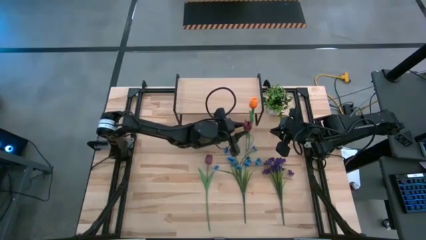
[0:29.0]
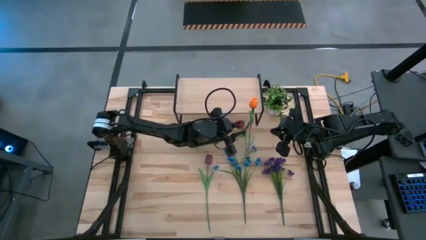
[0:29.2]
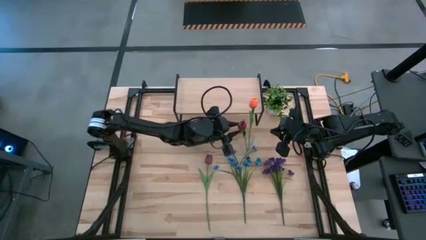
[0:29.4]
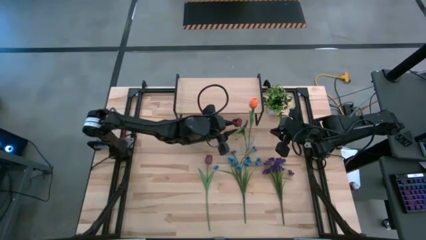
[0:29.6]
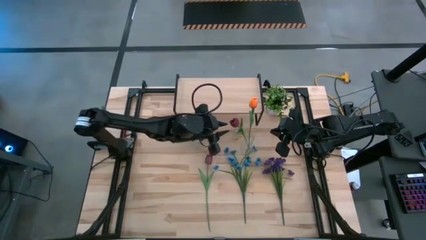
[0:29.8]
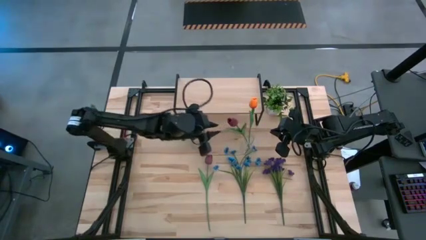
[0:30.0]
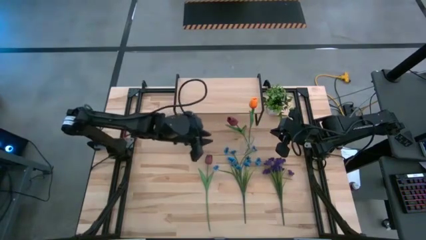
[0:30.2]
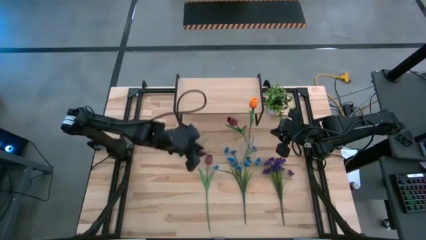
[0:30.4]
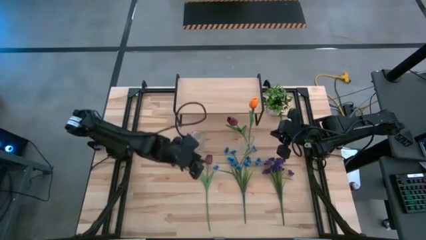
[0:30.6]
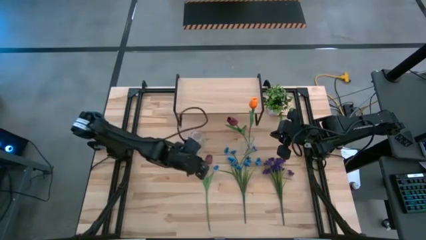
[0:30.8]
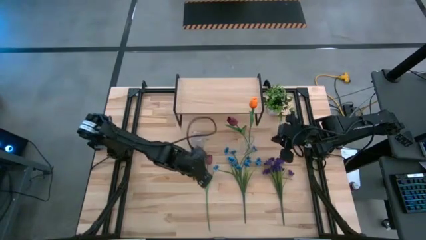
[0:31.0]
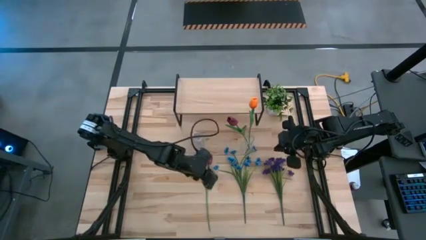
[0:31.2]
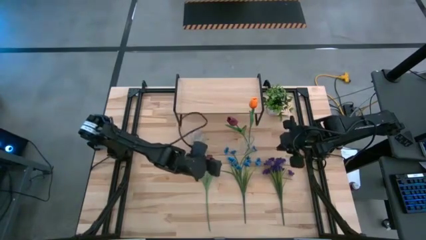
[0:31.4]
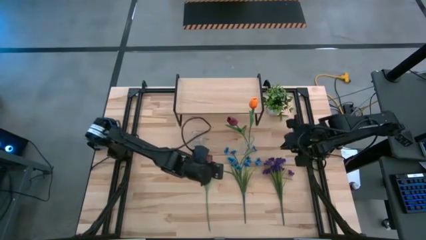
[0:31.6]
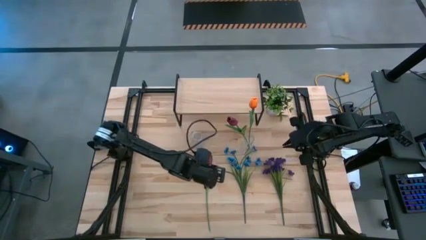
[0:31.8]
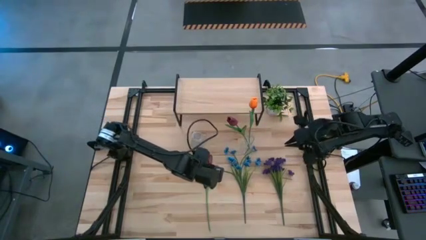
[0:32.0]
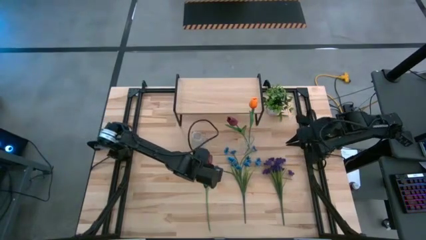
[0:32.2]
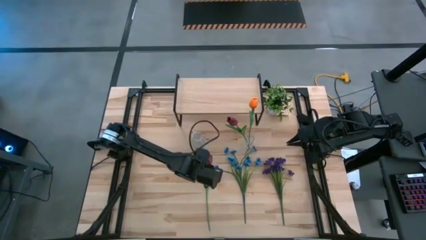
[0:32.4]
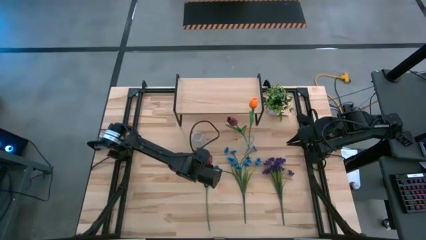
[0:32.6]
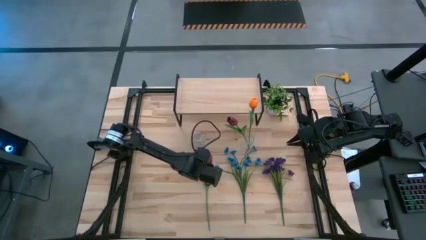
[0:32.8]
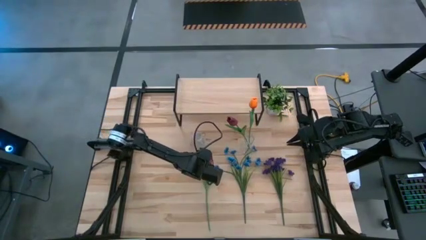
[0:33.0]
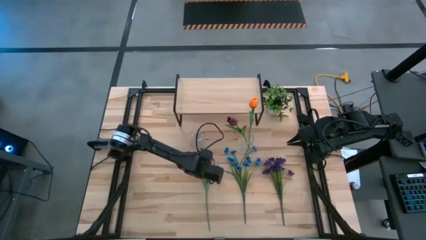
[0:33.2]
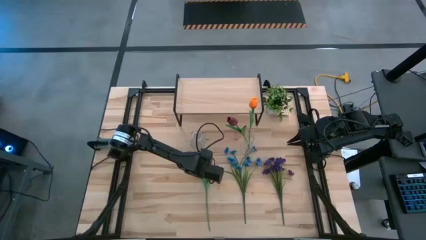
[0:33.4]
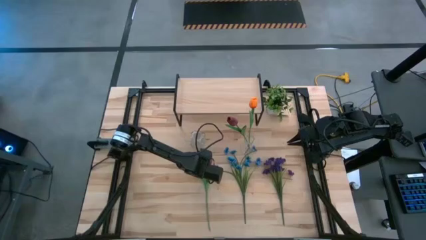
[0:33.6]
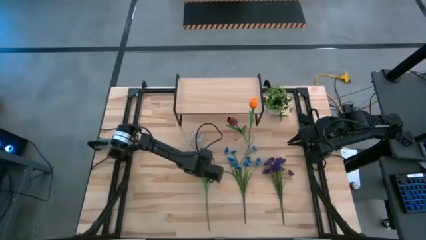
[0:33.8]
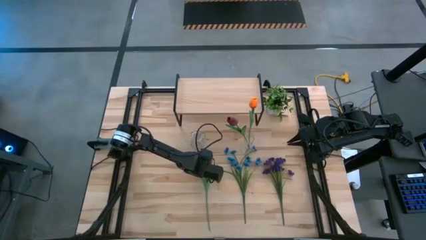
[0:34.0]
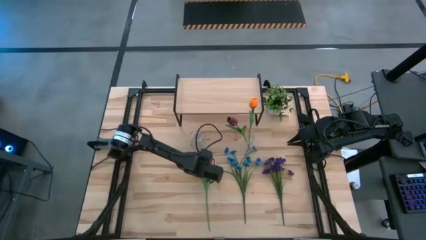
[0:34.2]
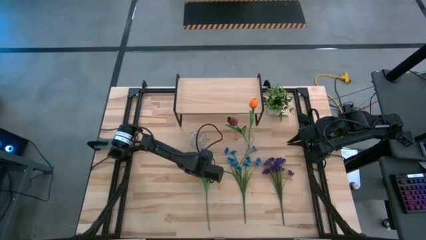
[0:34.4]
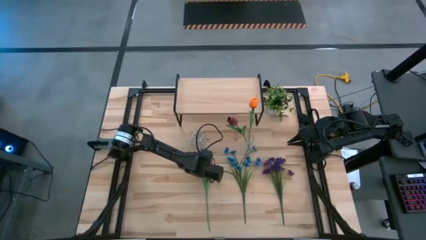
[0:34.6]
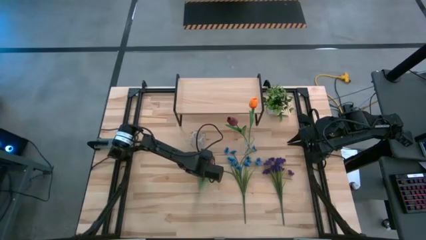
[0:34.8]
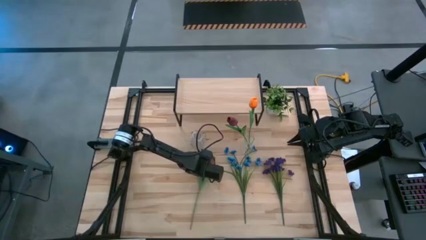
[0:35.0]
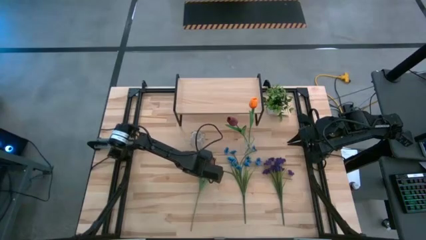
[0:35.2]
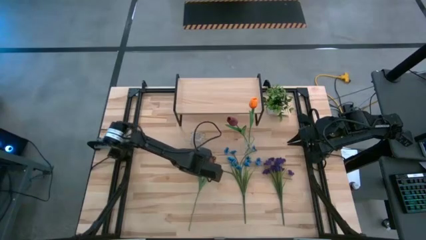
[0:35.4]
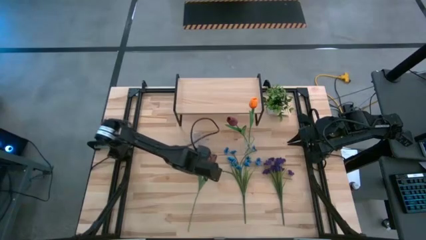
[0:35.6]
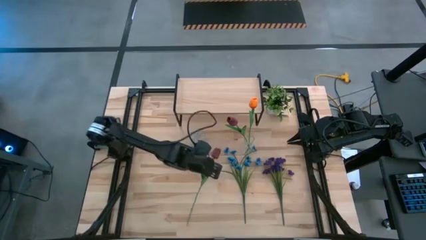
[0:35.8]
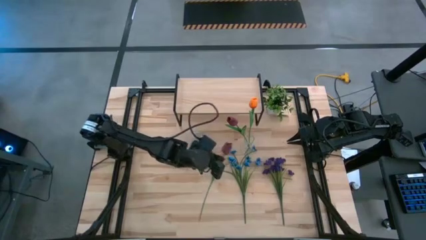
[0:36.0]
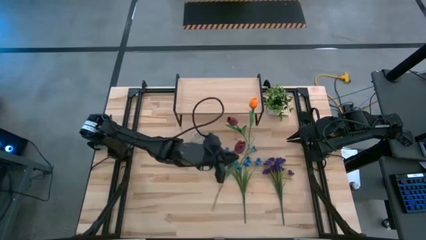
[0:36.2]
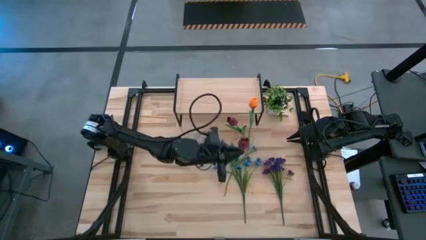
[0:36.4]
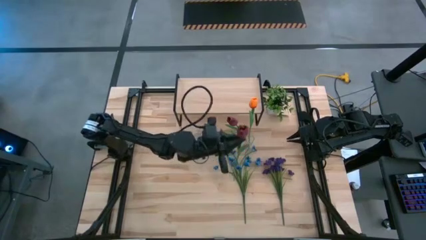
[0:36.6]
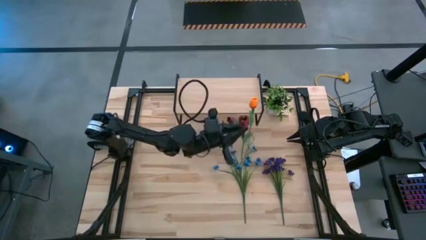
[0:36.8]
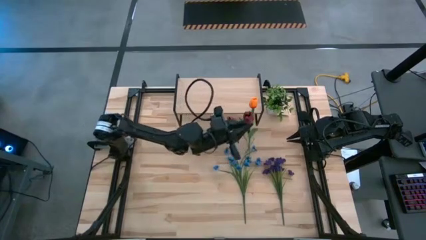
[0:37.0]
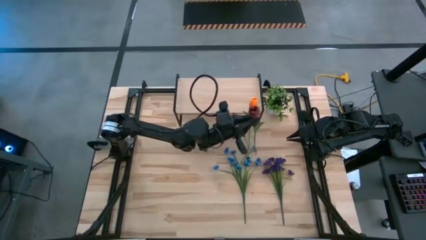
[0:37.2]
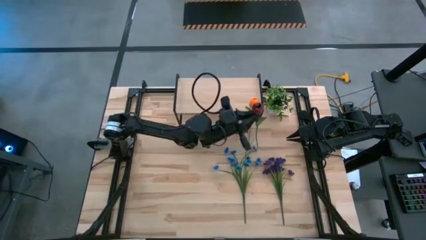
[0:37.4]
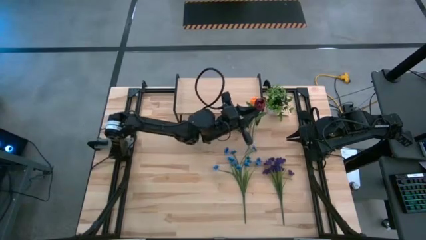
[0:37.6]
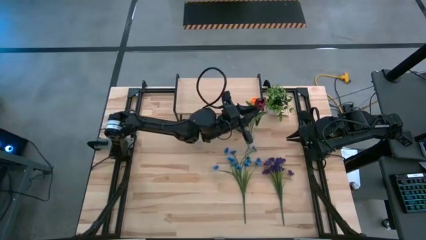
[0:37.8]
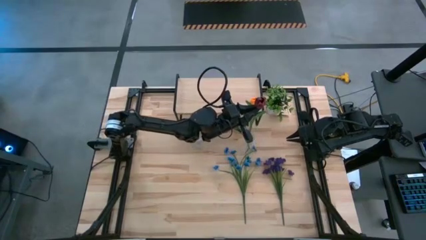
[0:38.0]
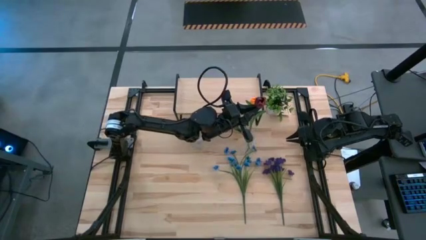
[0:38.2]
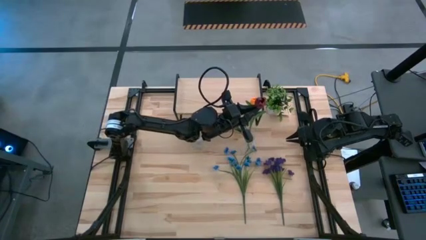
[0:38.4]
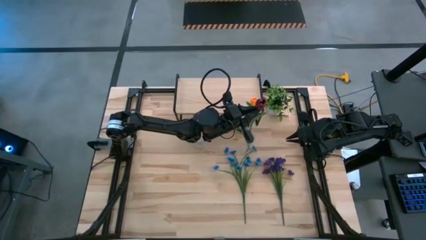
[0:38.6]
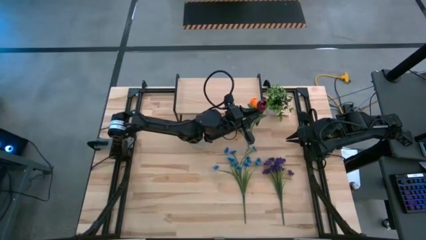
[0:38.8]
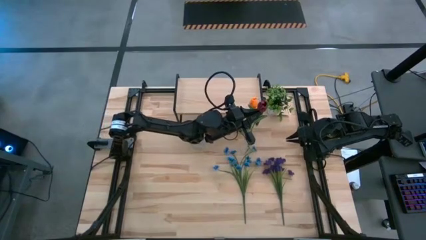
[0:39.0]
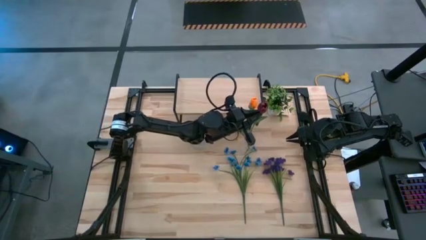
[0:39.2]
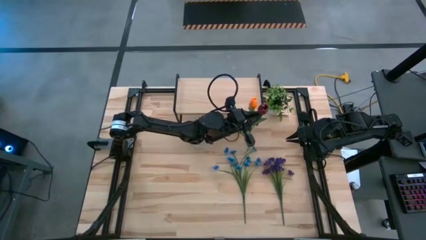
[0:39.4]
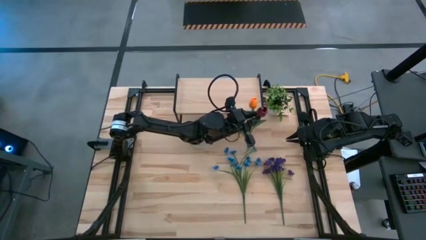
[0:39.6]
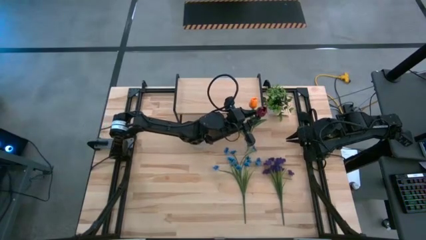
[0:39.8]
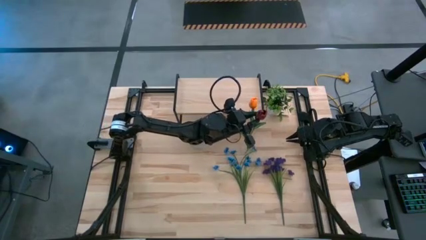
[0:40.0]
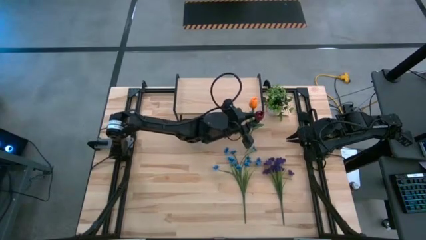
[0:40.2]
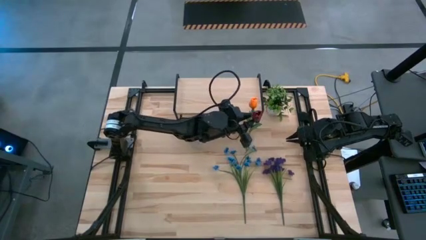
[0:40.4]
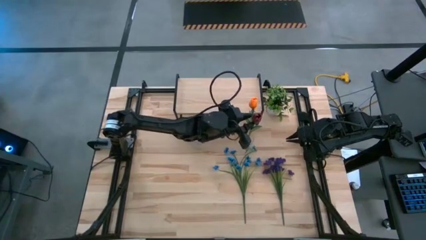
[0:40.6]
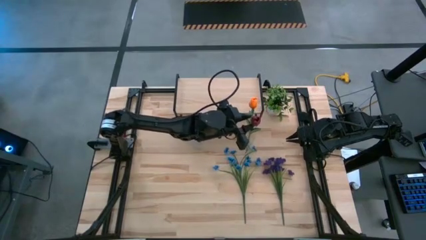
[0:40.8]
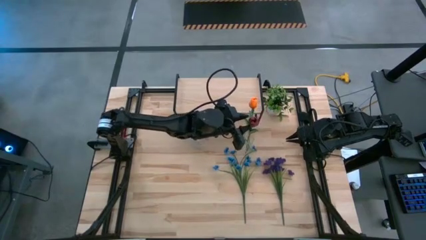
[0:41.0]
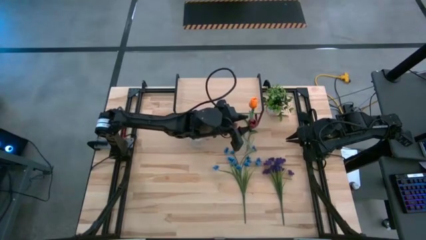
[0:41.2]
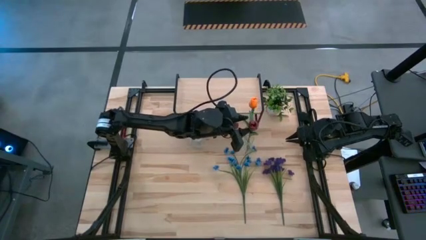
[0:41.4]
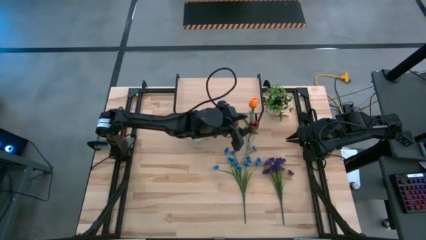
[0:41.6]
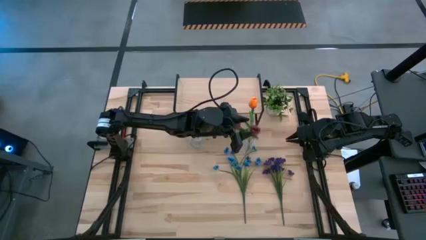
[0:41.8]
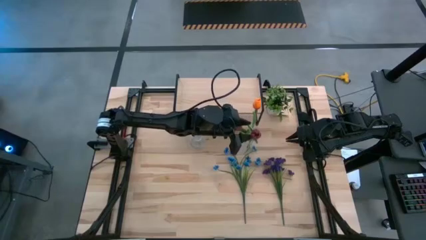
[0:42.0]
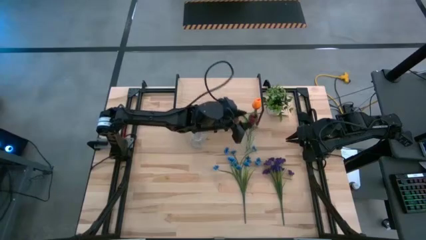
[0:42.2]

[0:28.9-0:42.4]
Task: Pick and place flowers into a vace then onto a shelf
Put the red flower into the right transparent vase
